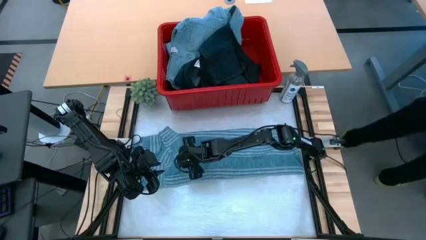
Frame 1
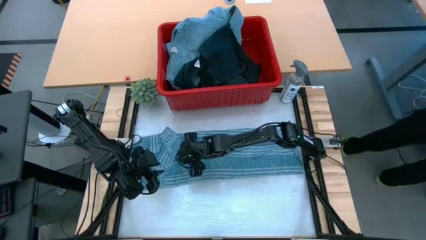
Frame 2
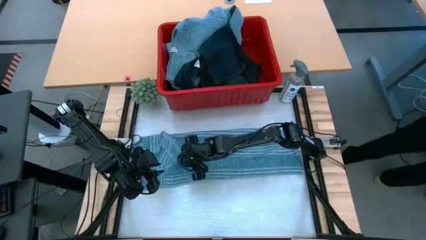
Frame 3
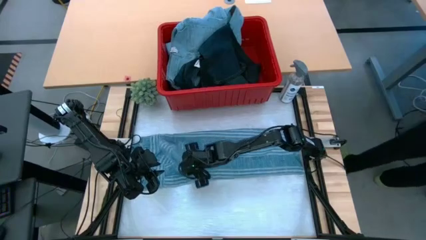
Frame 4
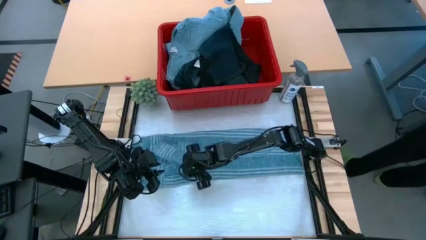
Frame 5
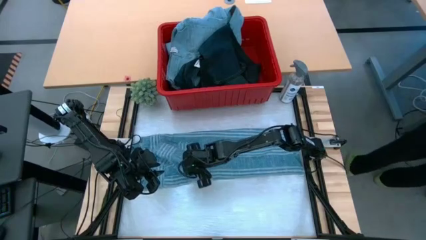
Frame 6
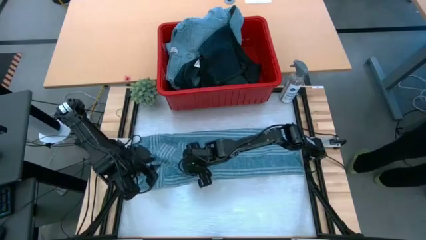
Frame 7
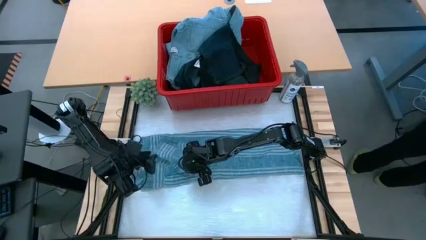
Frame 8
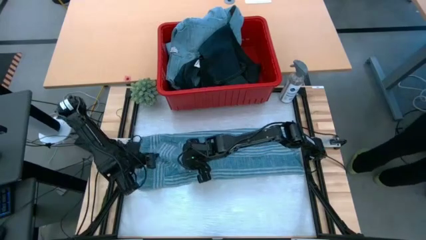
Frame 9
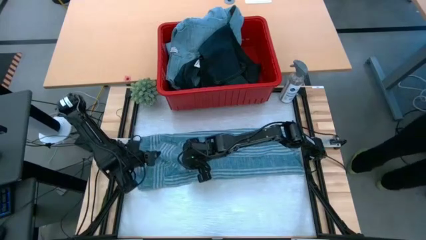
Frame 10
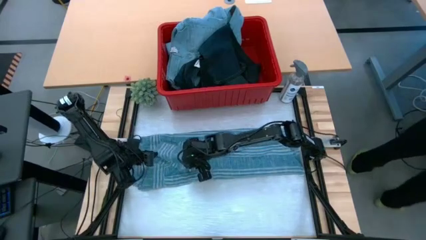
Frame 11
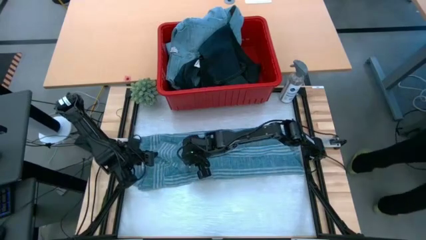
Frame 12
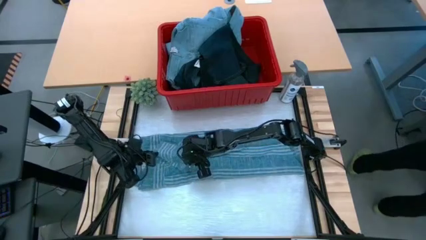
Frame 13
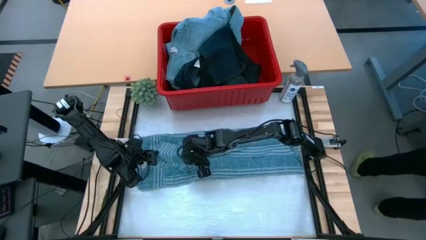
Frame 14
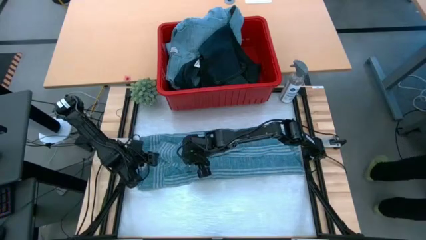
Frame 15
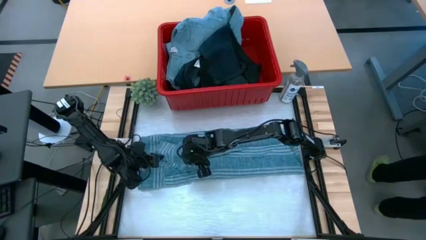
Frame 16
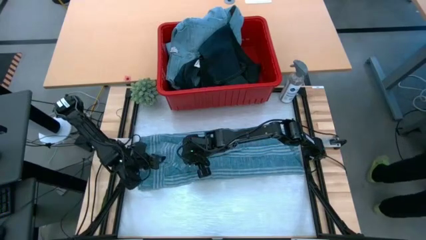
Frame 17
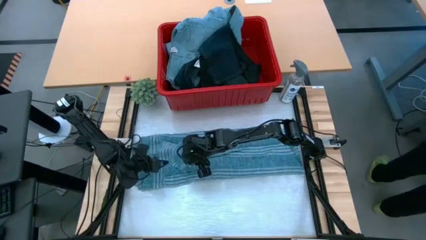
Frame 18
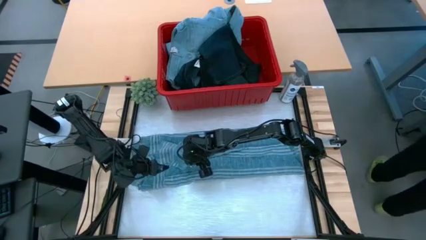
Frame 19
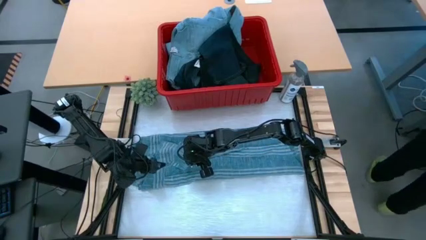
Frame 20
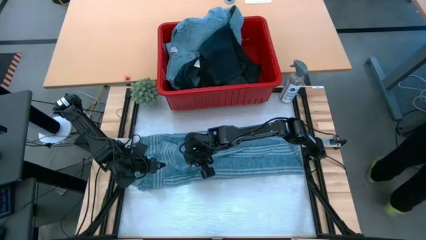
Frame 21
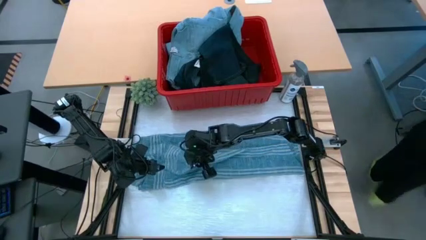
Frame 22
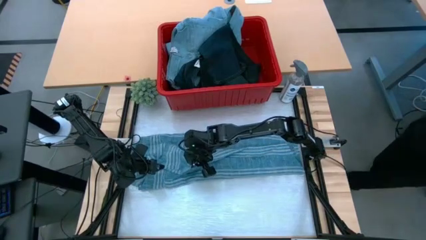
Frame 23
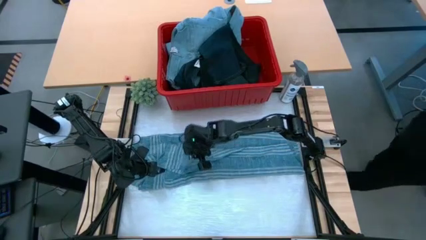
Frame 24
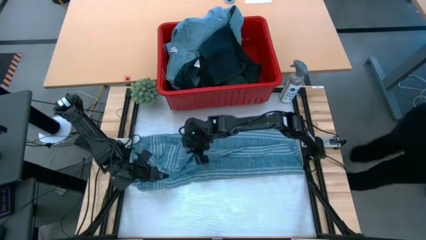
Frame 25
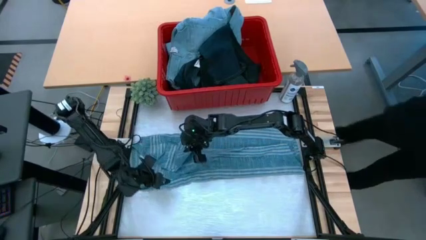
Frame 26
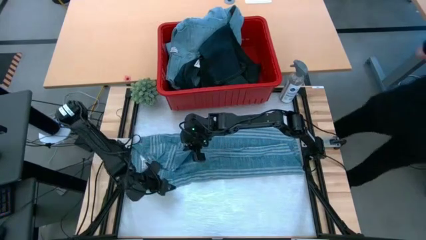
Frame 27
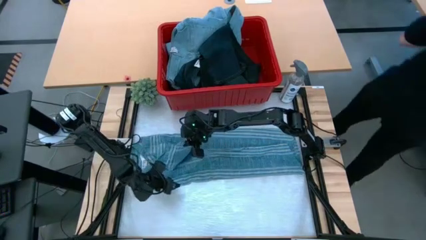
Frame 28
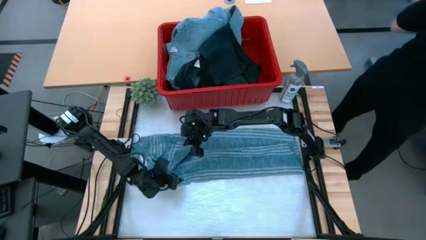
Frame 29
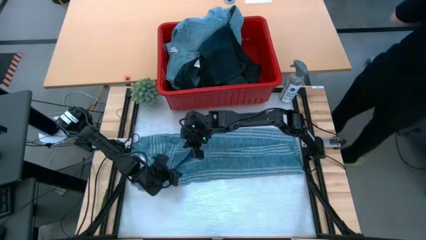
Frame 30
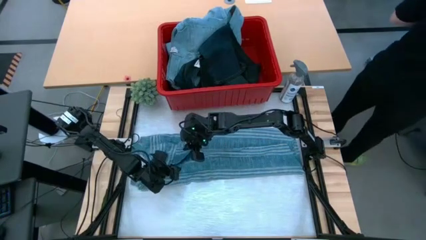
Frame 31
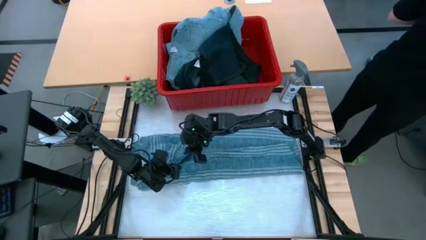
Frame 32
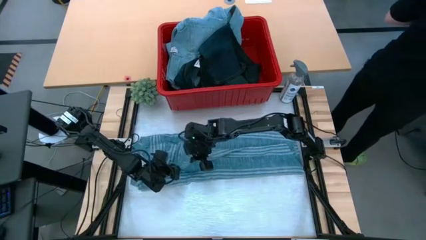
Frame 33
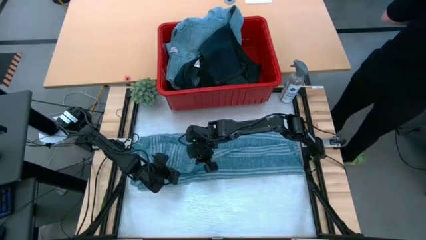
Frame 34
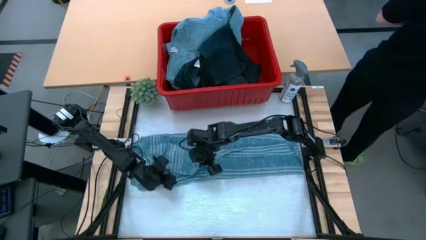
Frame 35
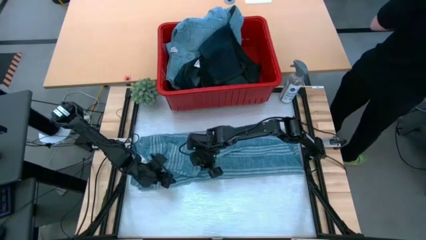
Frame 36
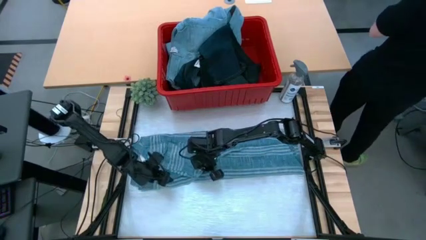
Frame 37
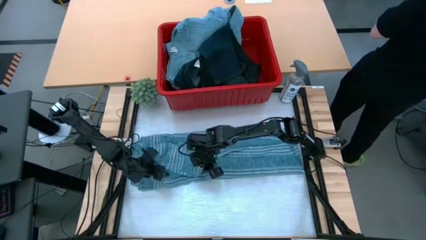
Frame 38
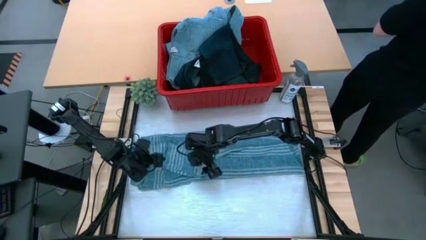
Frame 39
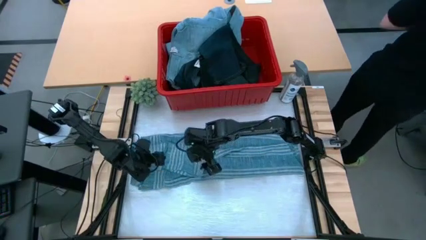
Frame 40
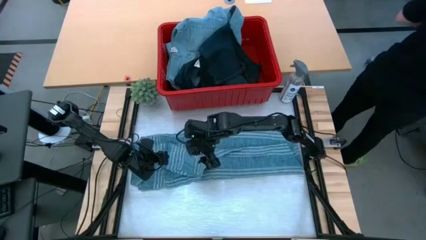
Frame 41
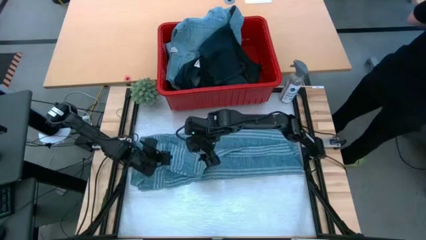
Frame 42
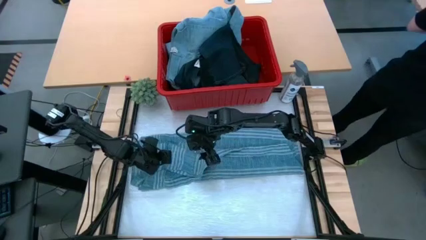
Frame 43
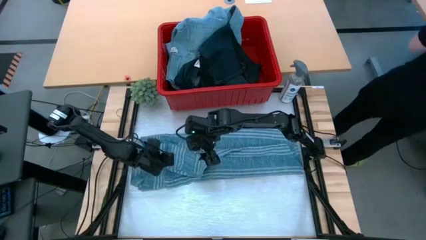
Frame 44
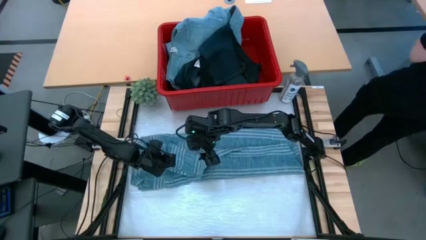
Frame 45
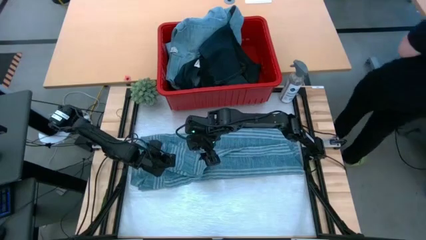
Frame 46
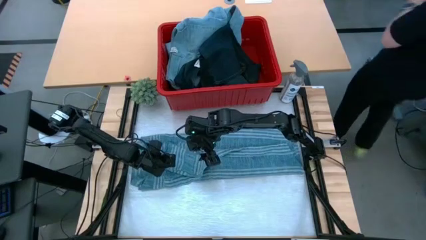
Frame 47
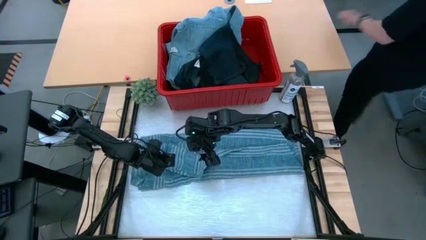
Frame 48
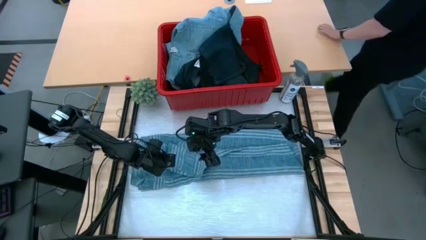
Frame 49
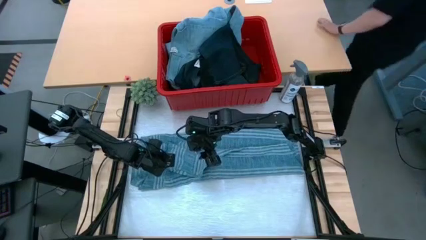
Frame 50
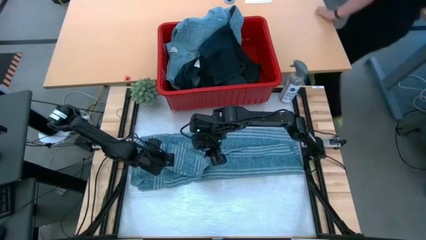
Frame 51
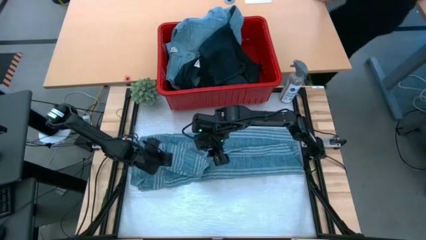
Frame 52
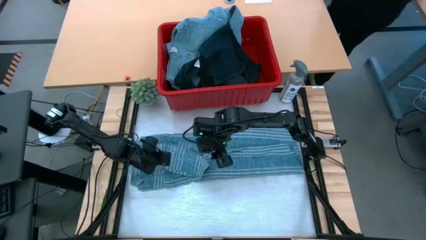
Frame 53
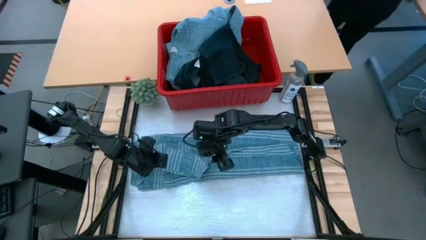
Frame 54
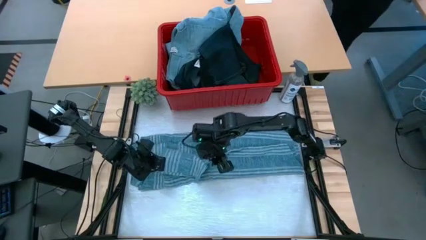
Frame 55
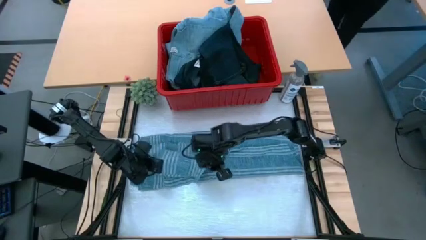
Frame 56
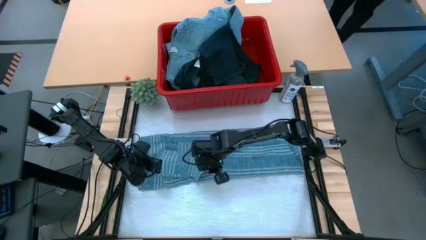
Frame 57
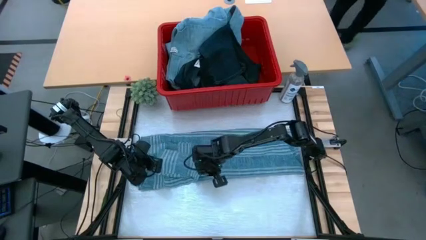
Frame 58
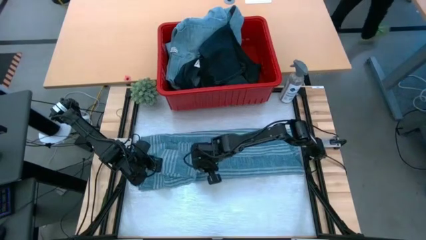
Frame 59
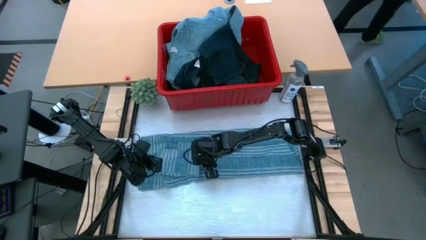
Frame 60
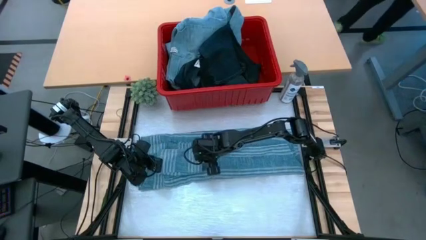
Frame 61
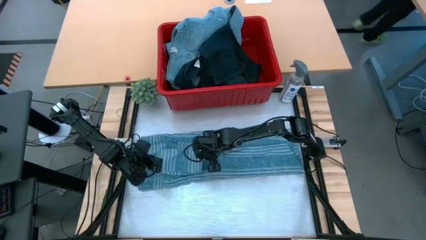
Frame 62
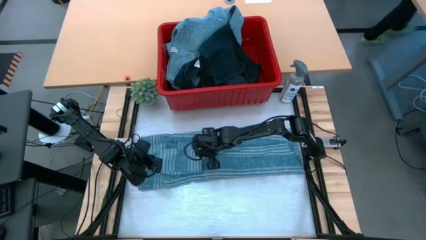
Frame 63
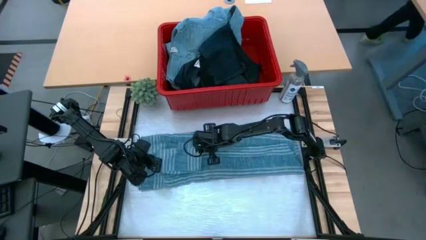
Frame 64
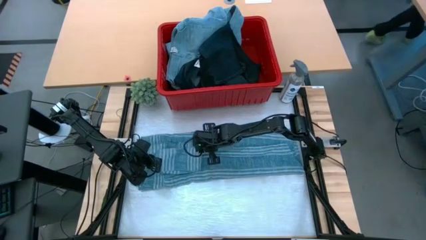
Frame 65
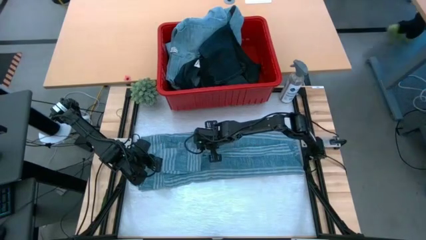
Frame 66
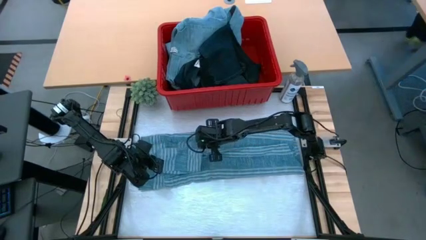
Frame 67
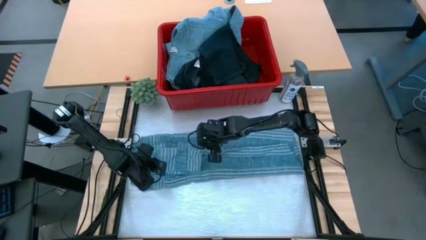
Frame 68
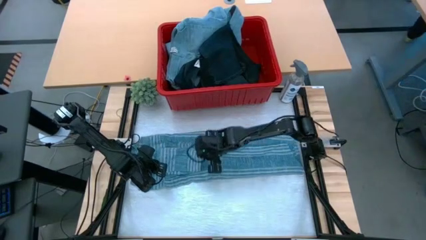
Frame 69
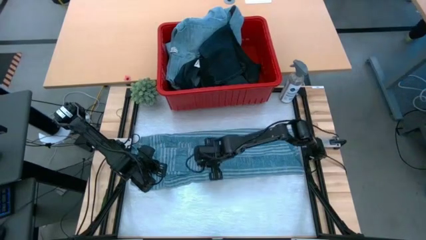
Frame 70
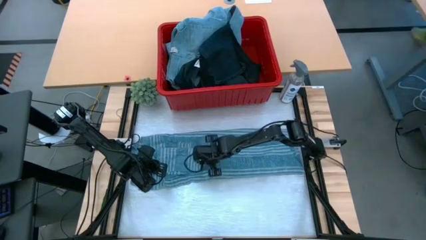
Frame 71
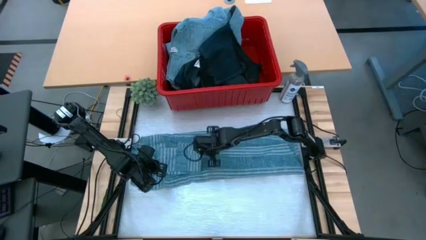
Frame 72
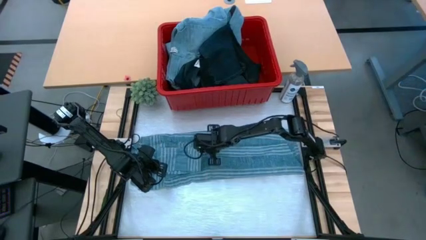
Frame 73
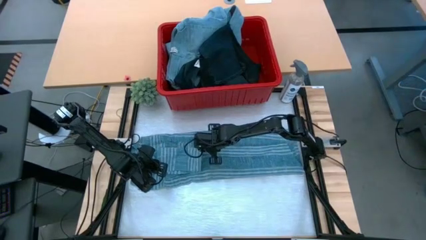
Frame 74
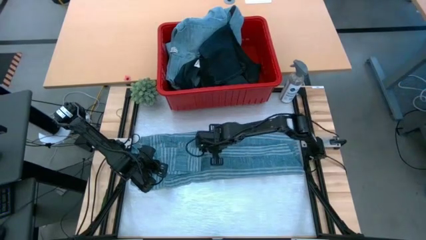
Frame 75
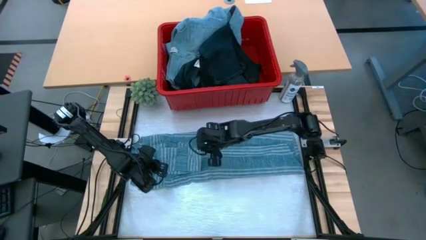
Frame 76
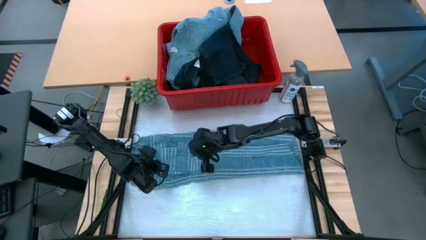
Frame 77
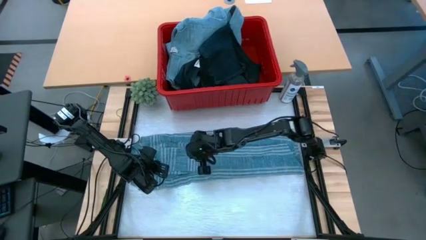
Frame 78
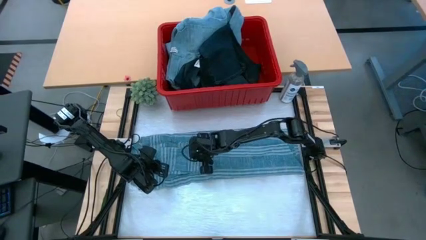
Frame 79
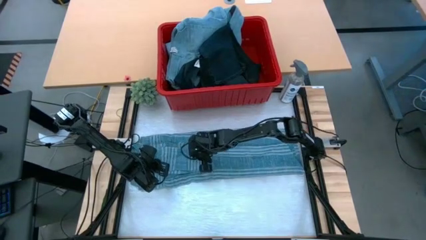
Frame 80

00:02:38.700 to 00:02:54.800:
Task: Fold Laundry from Bin
Fold the blue polo shirt
